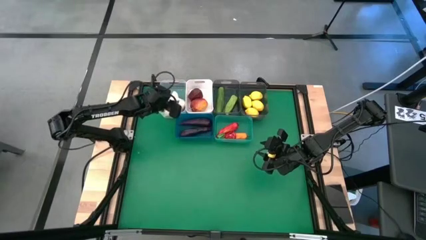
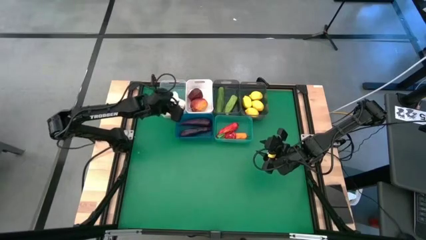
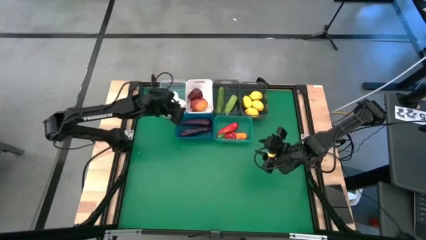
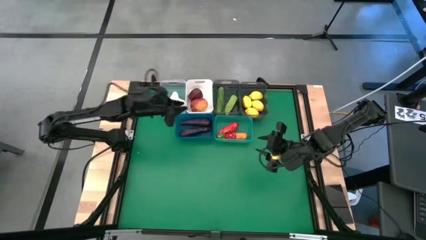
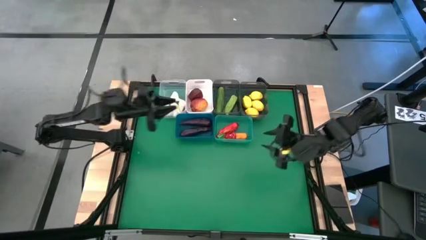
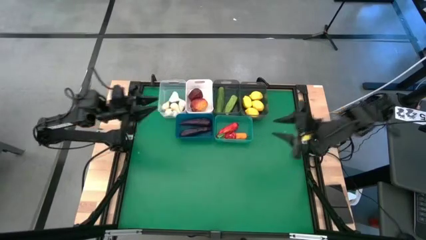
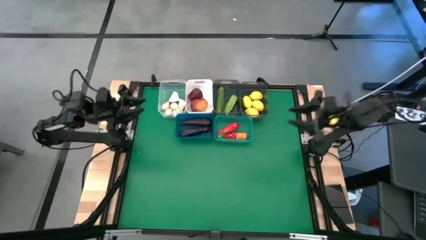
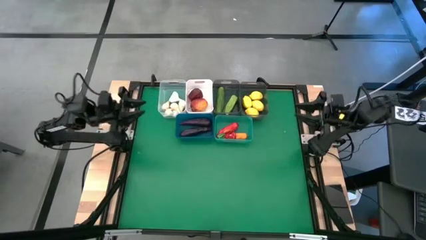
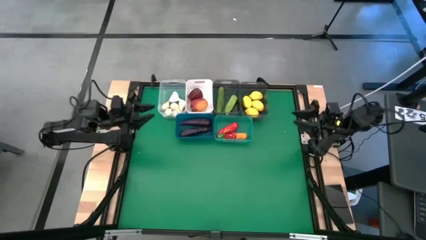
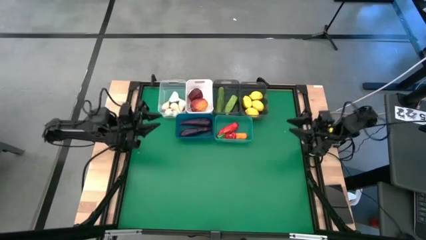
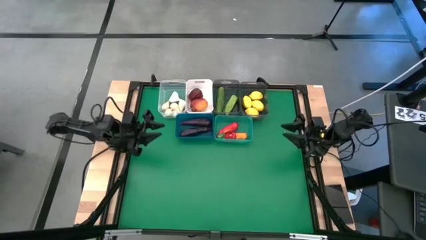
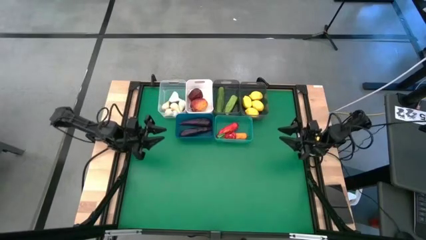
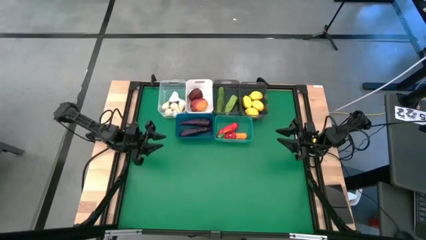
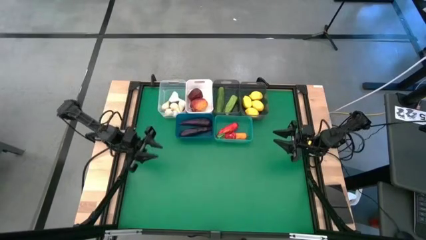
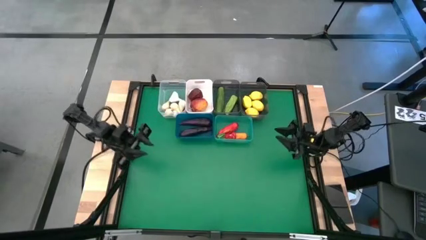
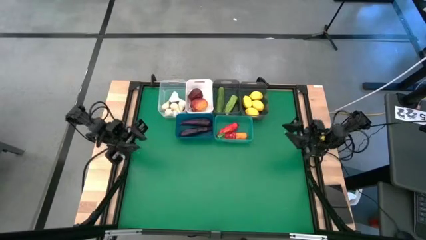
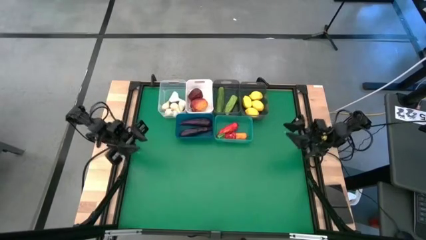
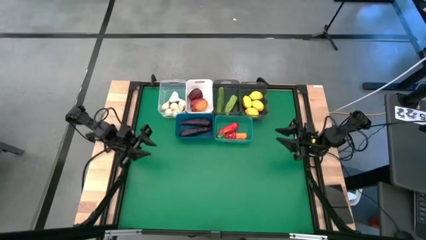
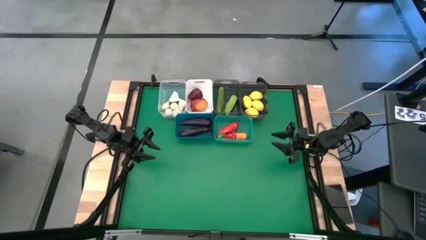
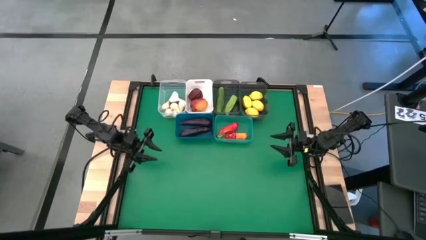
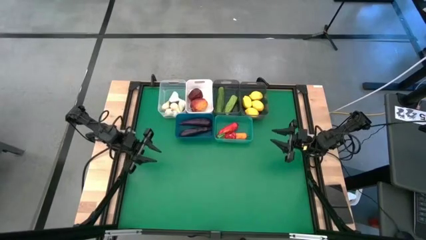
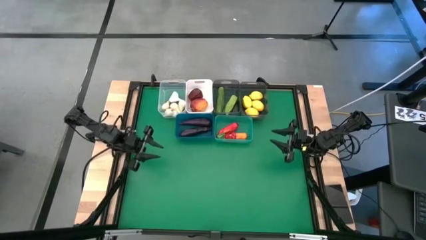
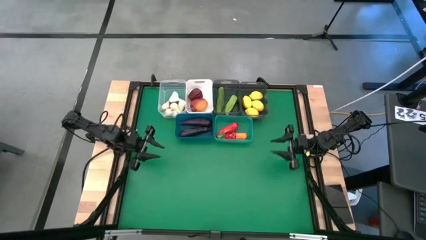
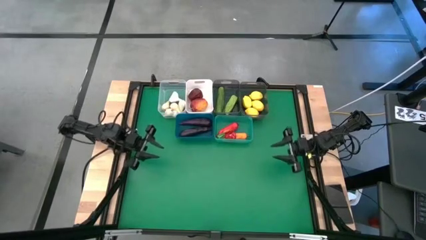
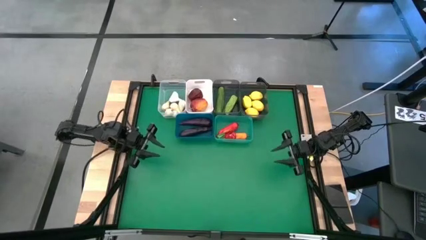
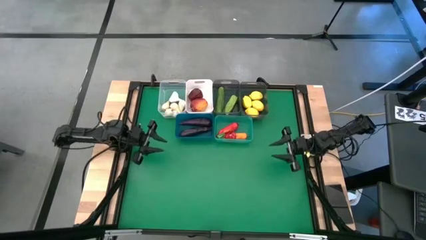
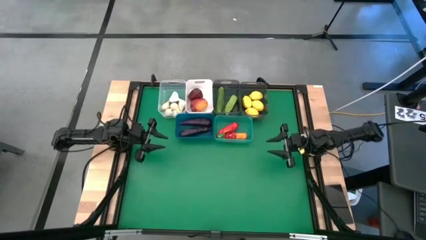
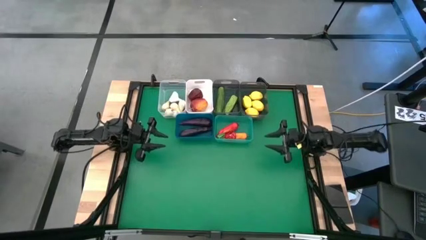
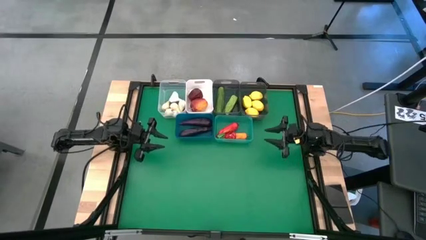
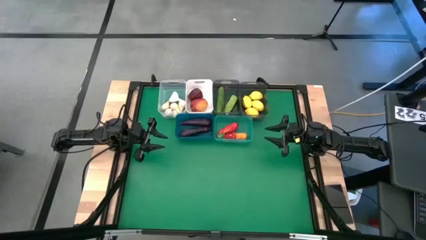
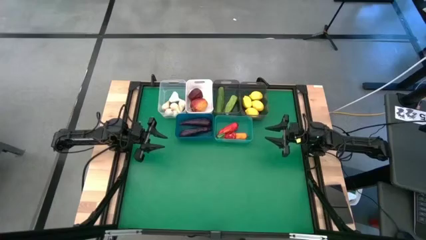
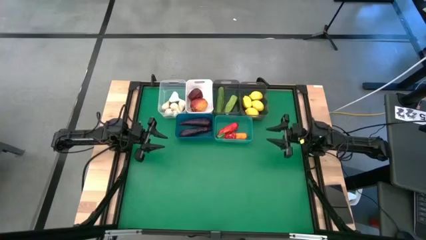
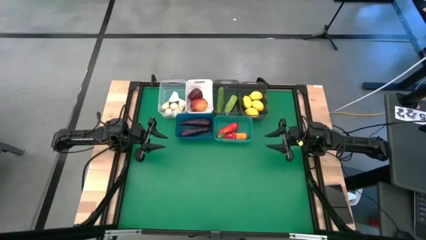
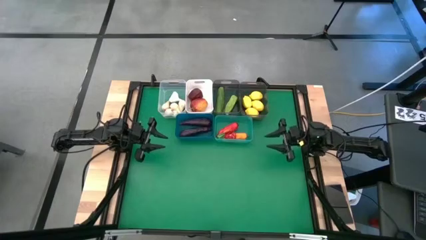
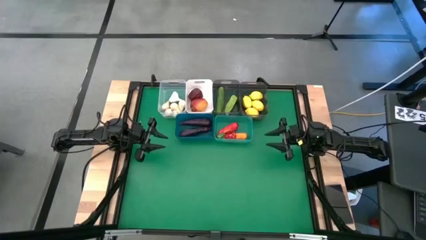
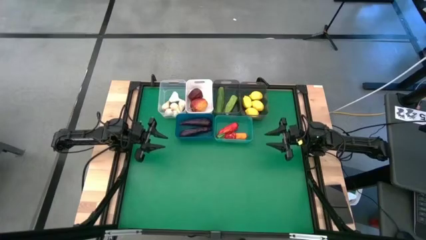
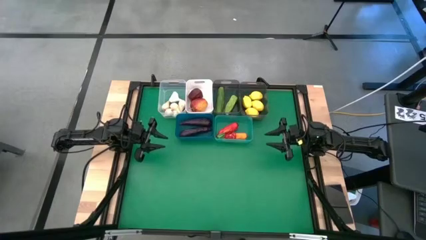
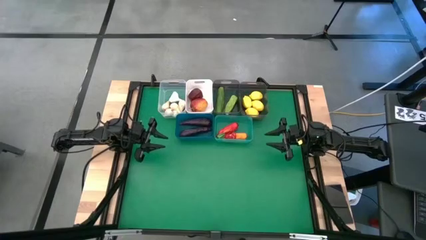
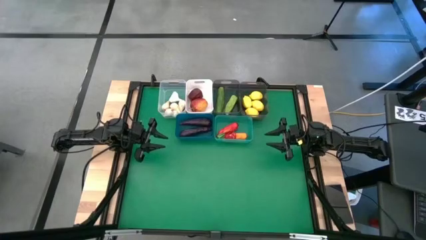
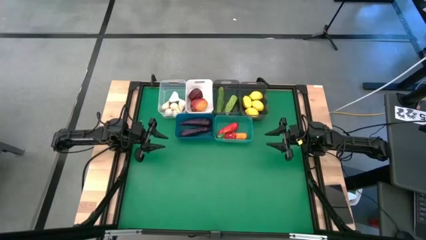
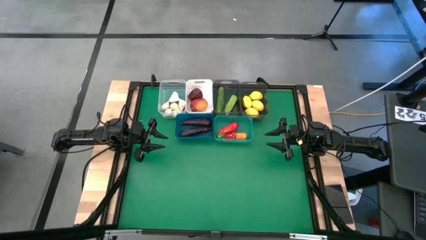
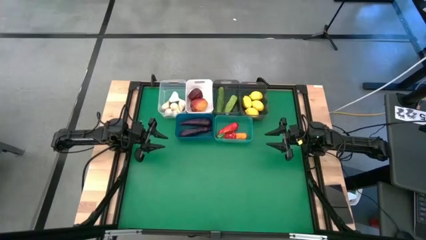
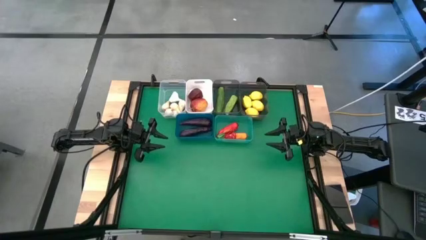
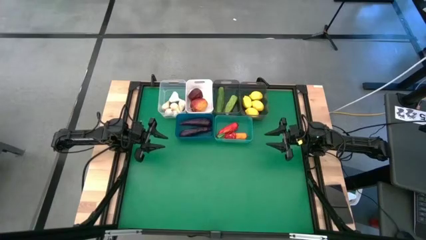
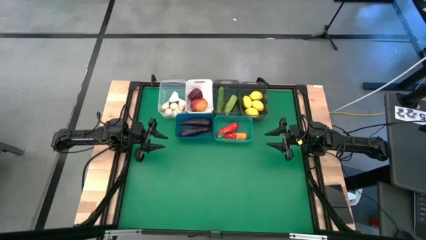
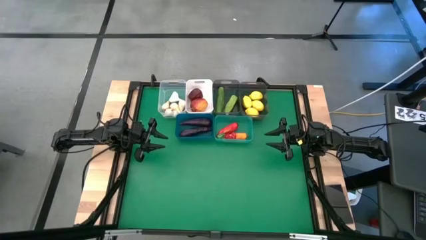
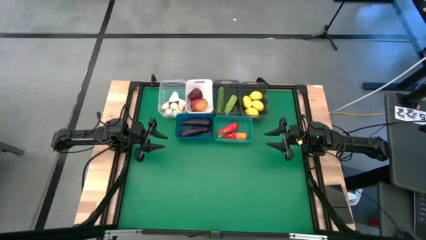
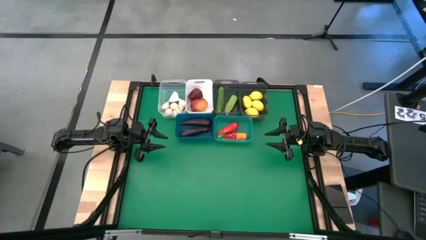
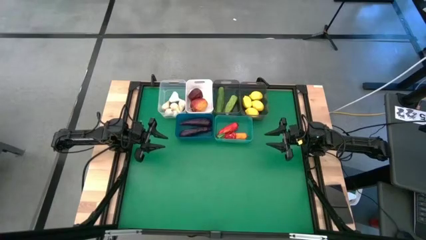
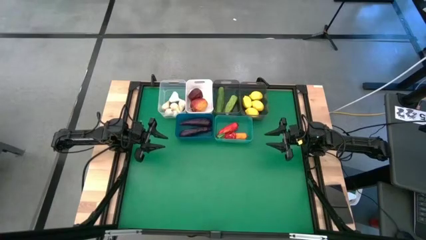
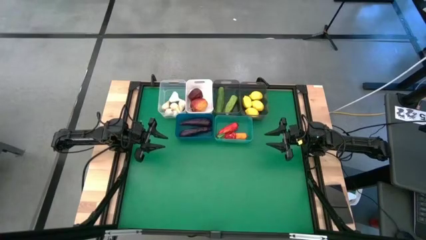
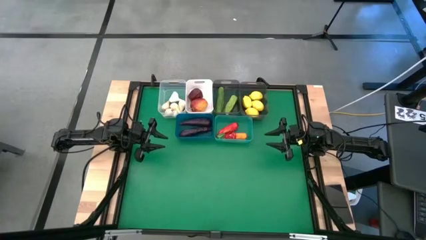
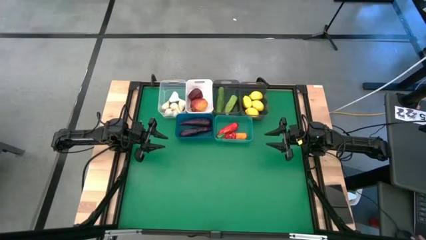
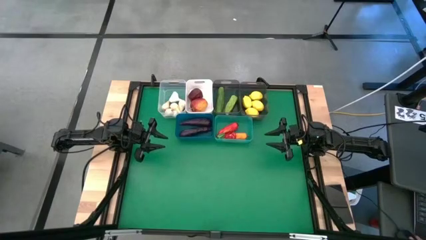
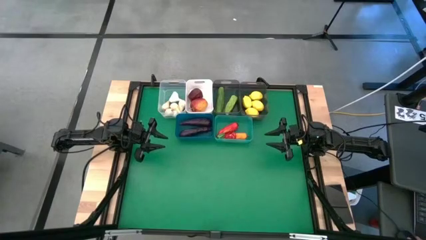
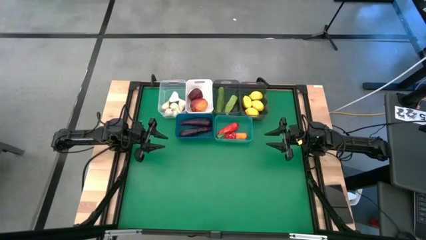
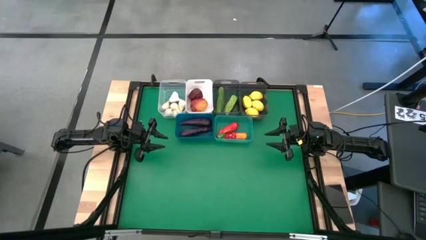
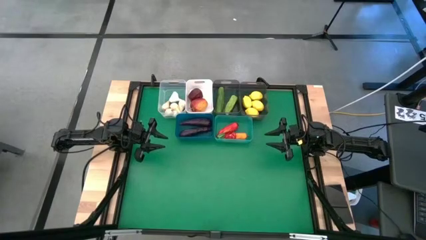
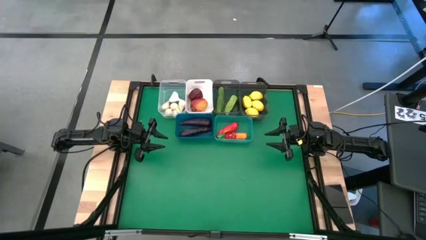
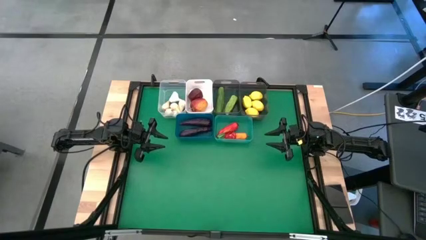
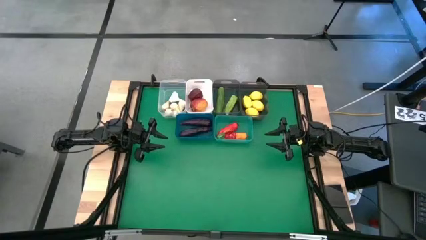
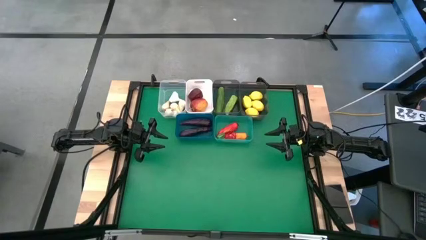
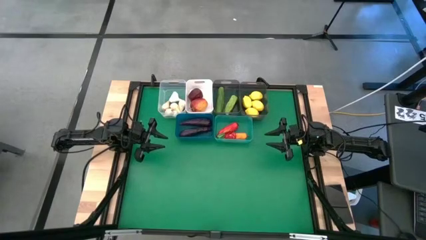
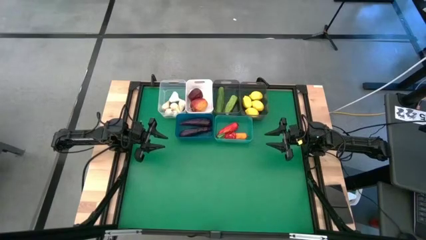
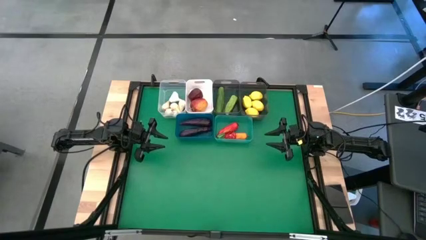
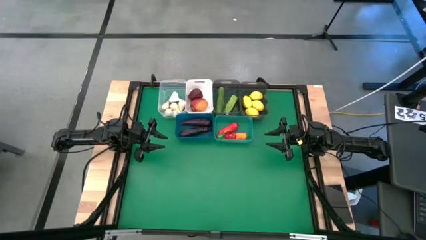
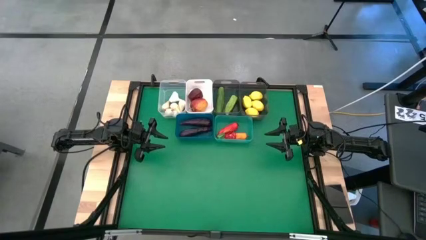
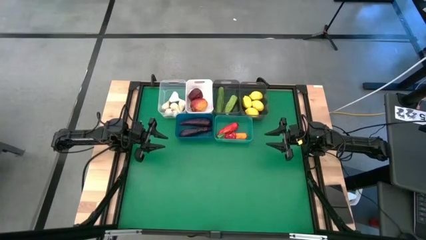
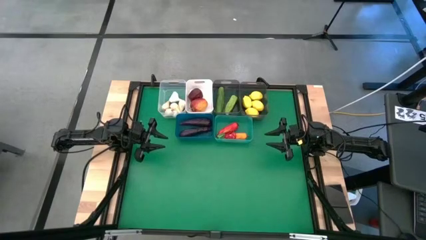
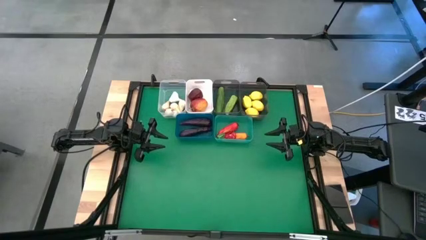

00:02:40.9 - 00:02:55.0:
Task: Sort produce into baskets
Return to Home Position
